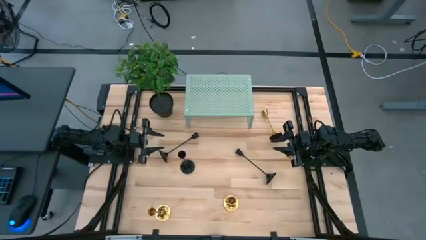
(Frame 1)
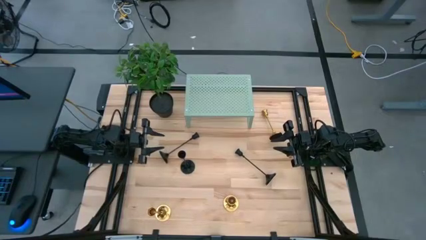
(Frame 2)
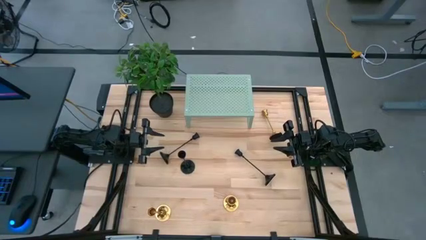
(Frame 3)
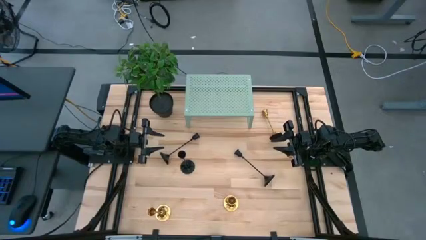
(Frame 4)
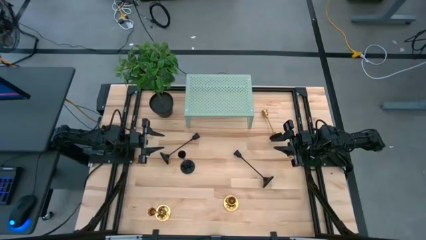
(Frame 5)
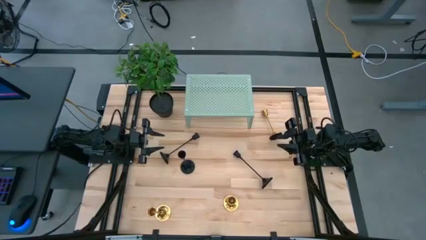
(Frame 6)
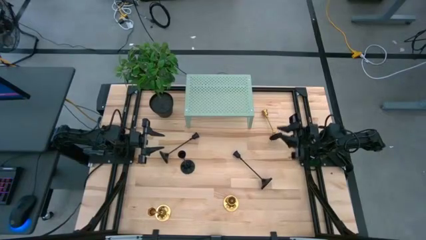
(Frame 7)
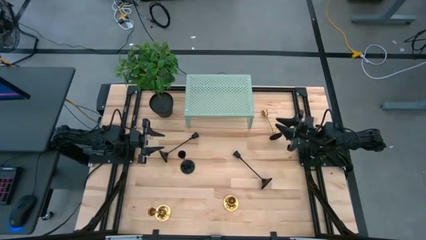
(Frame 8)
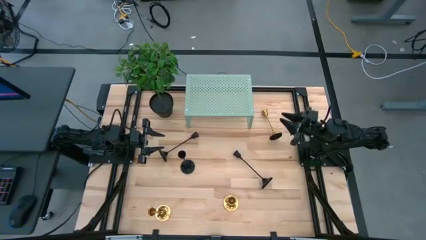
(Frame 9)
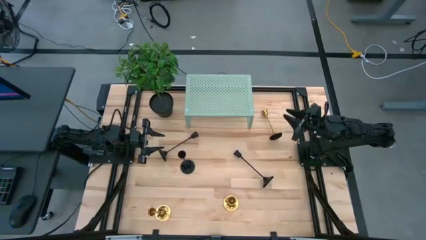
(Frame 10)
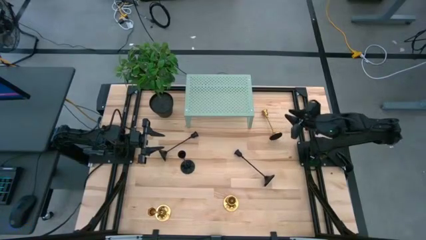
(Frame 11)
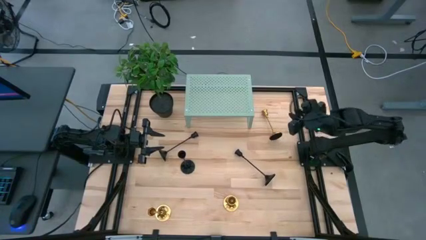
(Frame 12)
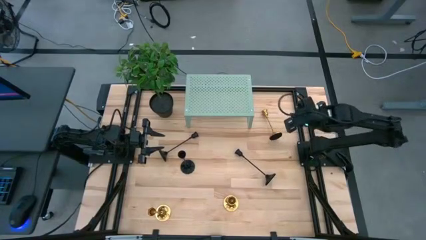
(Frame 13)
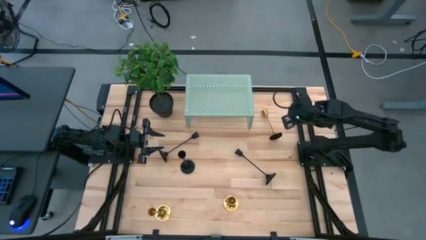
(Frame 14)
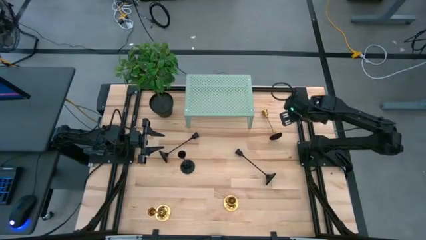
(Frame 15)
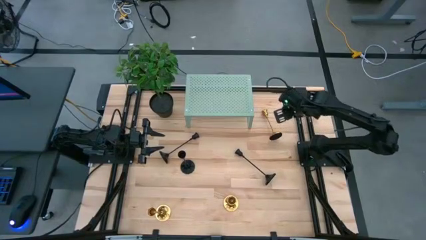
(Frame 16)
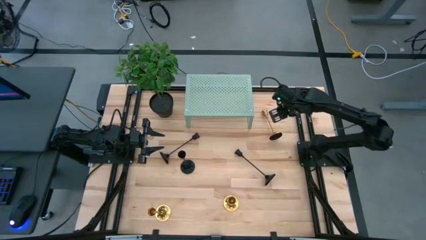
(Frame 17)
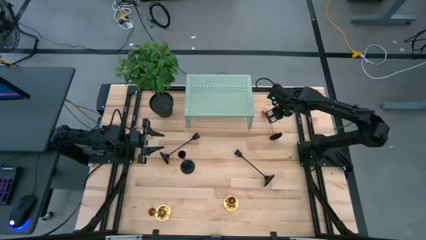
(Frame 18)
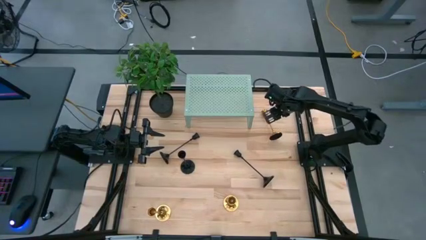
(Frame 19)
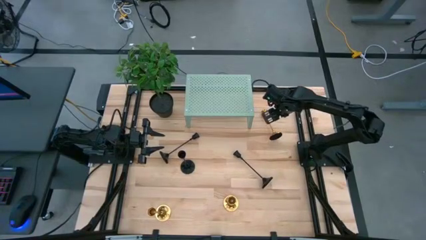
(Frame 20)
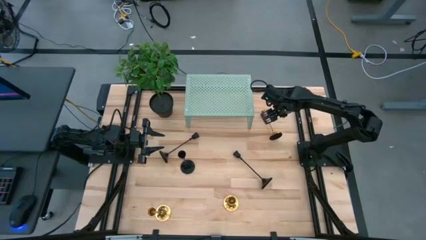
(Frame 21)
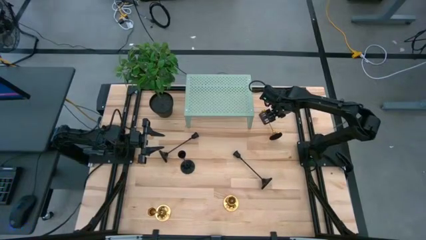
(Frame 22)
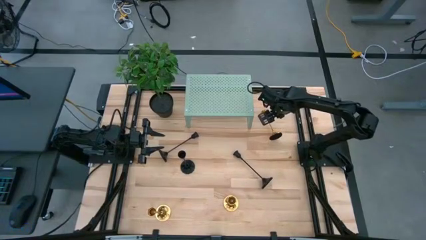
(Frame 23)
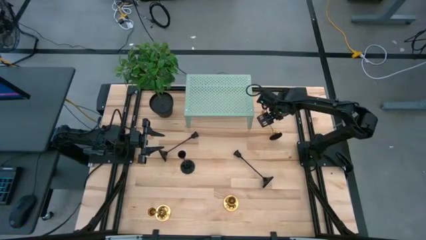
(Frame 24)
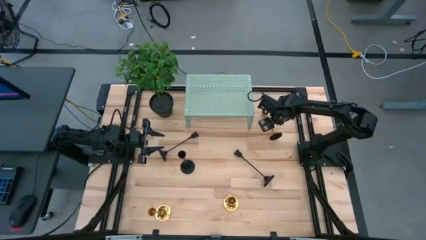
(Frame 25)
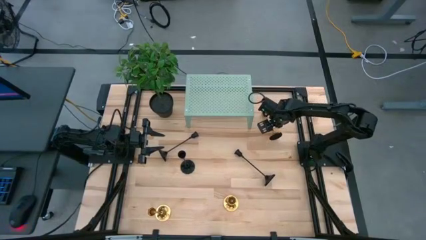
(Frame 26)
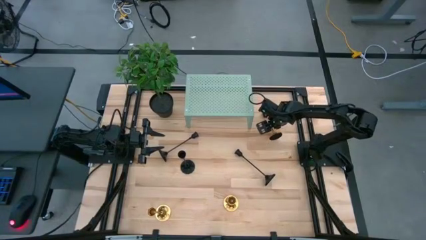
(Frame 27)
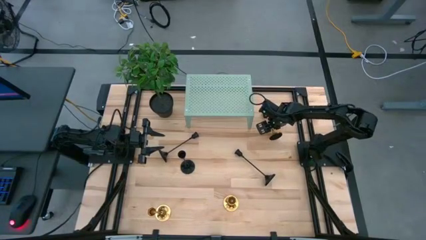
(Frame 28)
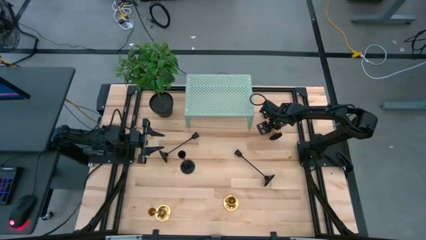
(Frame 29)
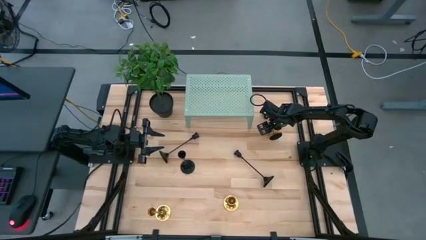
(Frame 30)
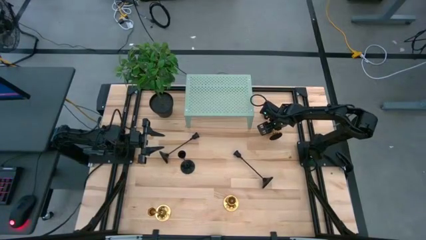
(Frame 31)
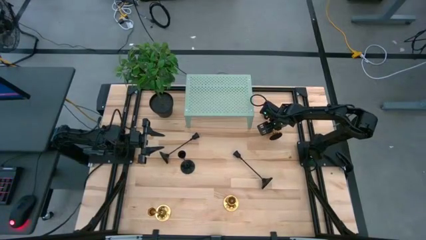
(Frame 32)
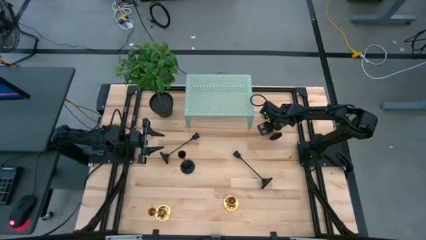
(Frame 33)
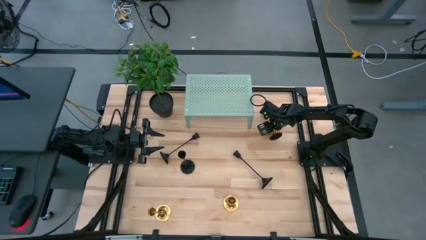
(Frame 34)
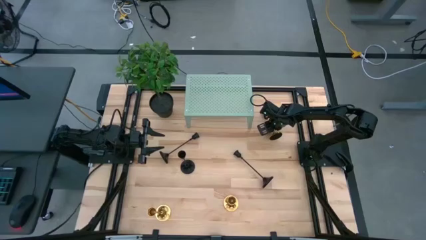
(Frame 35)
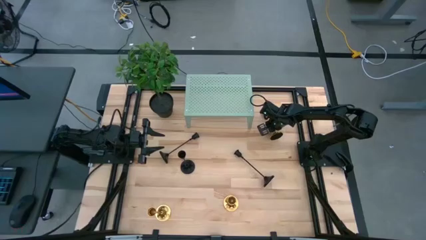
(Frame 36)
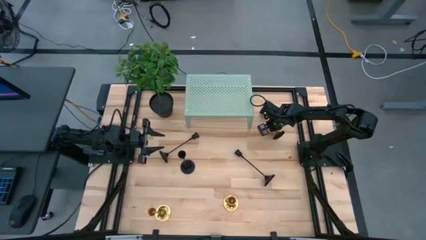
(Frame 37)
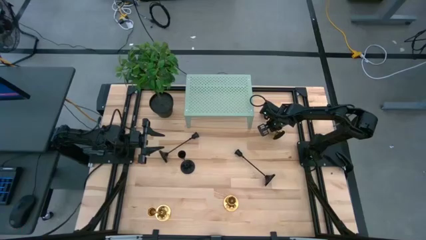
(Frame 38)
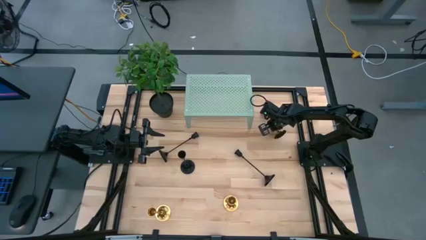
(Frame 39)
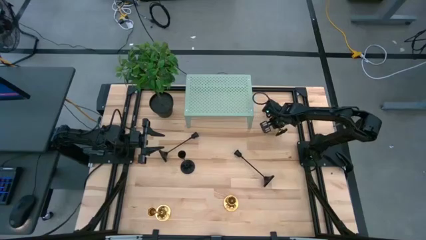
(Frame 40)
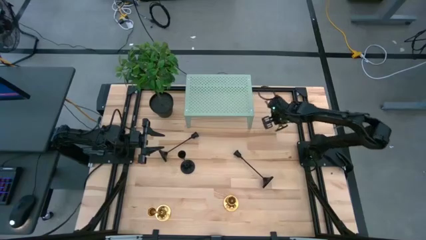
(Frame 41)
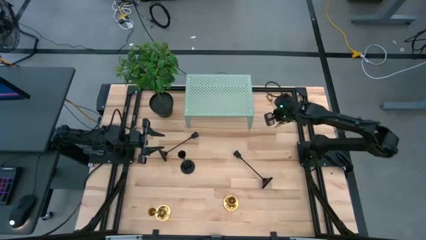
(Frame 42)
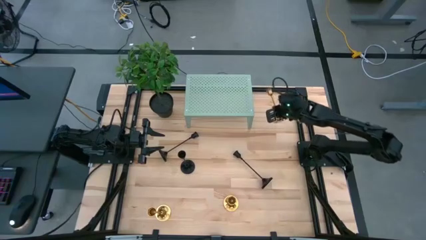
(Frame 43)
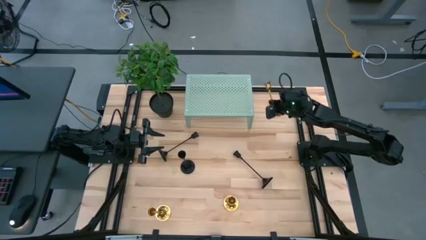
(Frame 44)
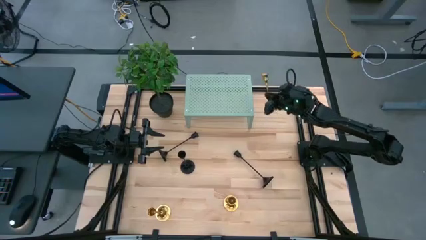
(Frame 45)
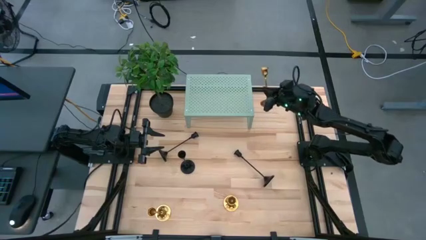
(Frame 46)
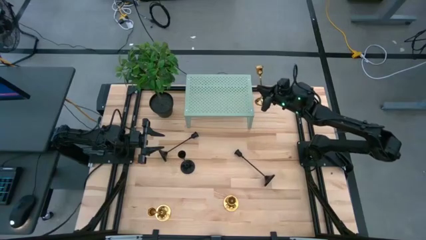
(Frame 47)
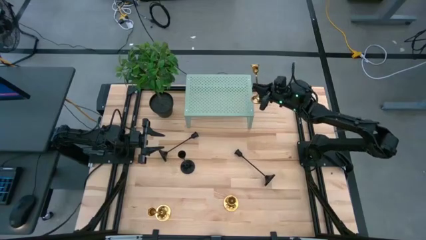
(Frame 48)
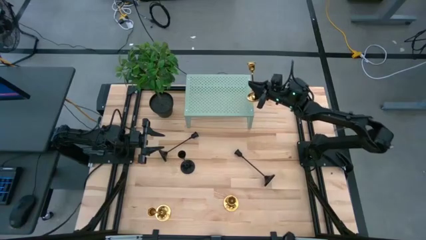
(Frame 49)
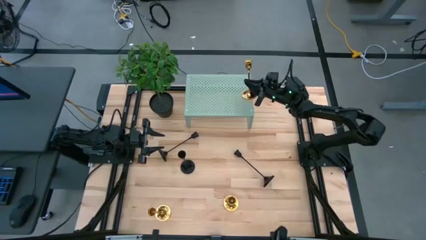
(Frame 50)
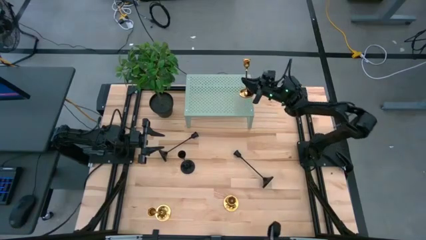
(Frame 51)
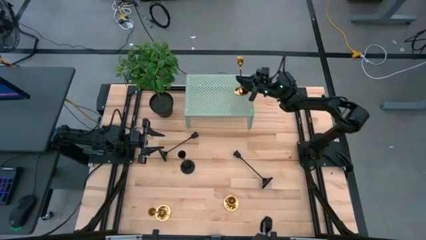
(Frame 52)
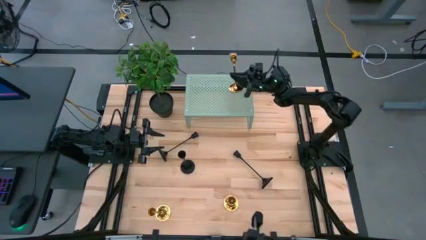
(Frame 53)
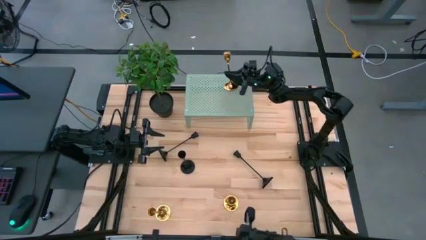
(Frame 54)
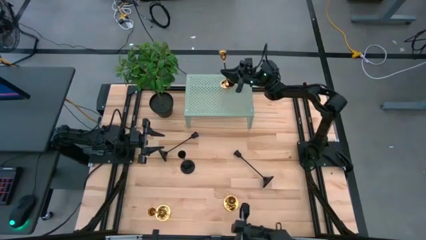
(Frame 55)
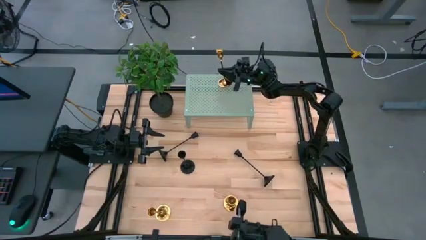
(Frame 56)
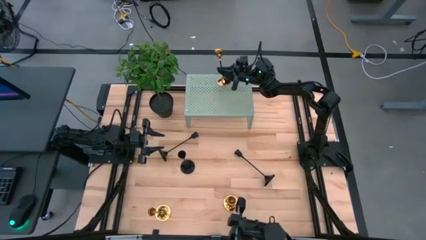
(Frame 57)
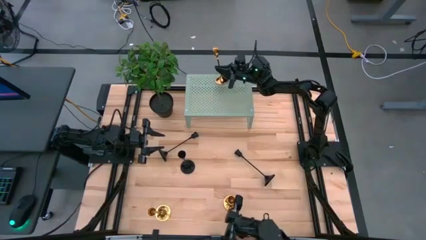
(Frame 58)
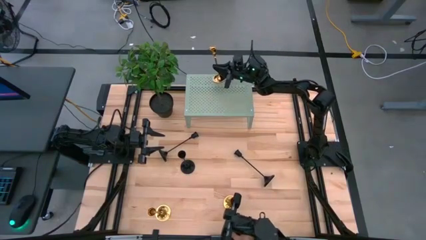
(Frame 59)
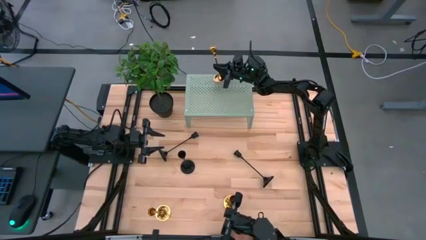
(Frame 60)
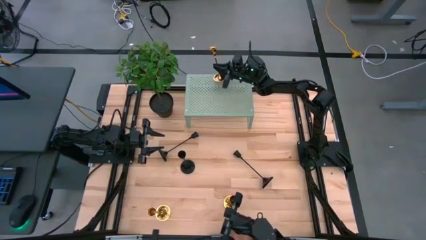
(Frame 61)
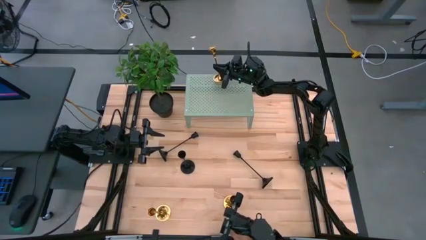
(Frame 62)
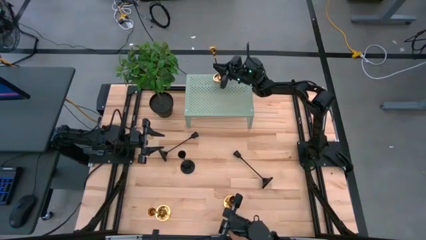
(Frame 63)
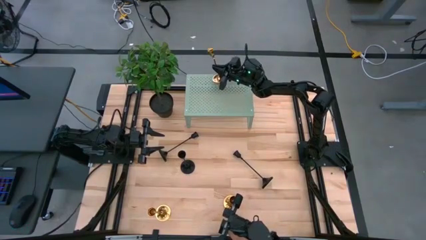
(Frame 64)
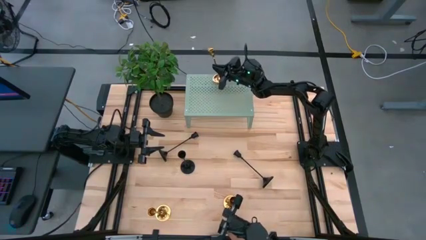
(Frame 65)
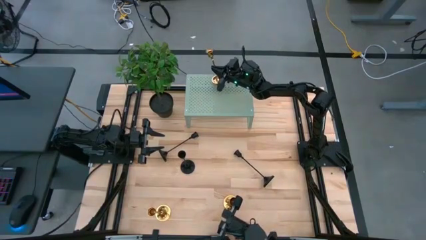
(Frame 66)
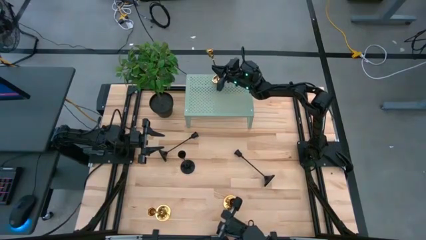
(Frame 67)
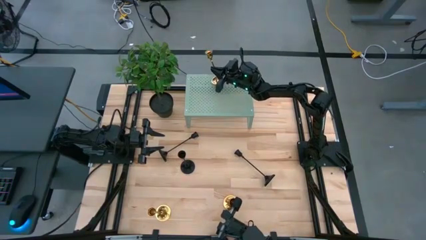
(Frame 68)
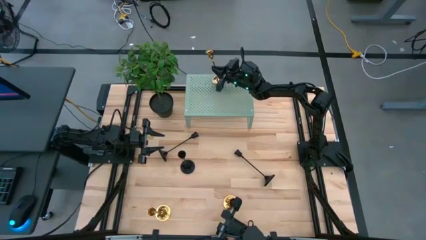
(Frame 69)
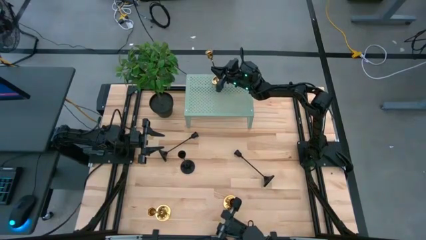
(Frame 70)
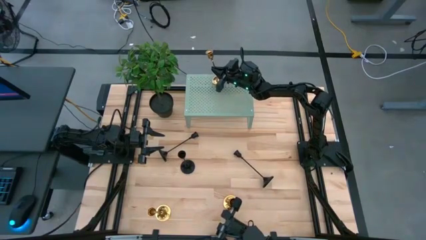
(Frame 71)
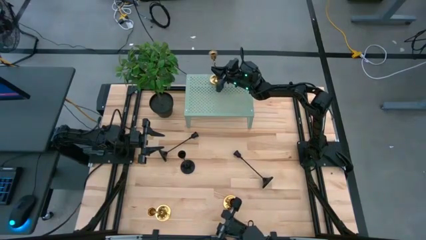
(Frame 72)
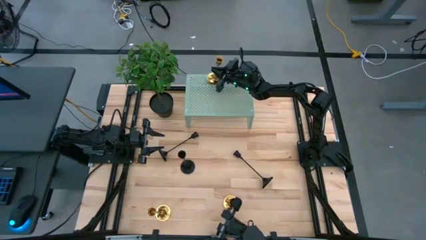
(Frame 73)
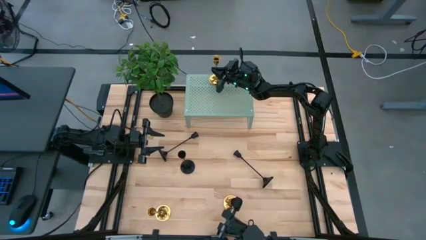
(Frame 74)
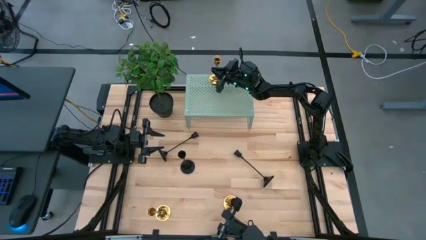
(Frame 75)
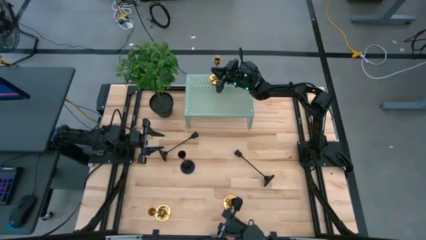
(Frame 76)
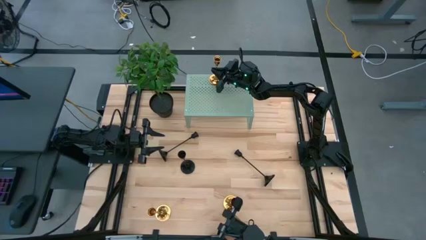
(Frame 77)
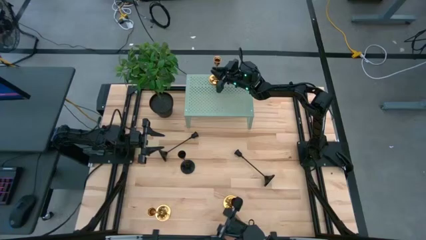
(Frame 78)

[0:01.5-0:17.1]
Task: Pick & Place candle stick holders
Put the top gold candle holder on the shelf
